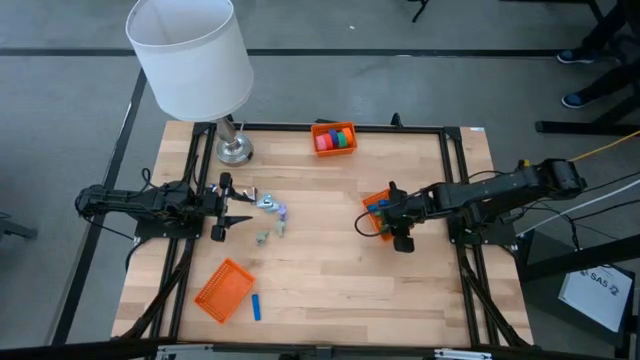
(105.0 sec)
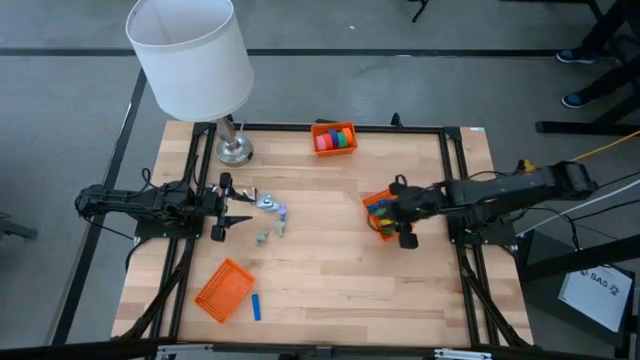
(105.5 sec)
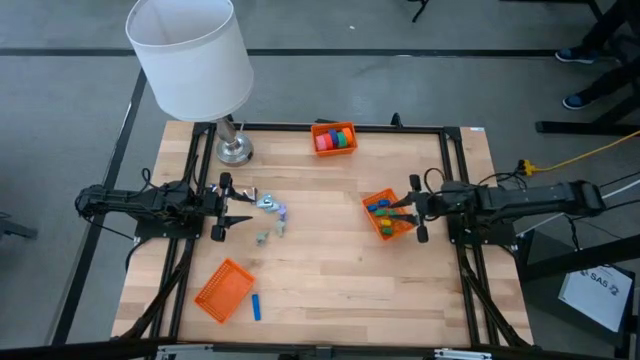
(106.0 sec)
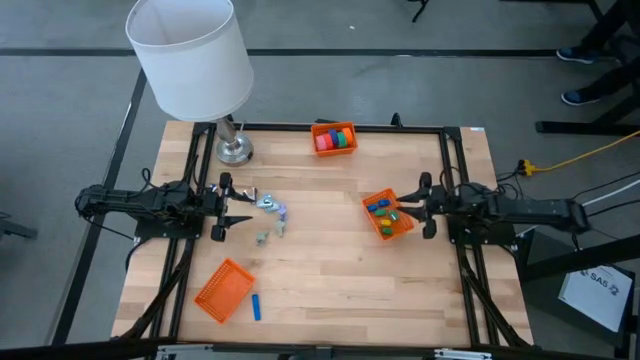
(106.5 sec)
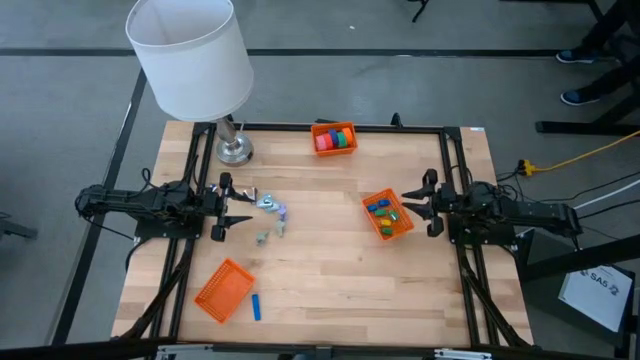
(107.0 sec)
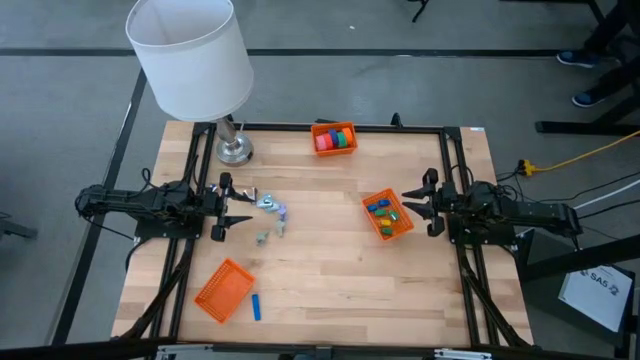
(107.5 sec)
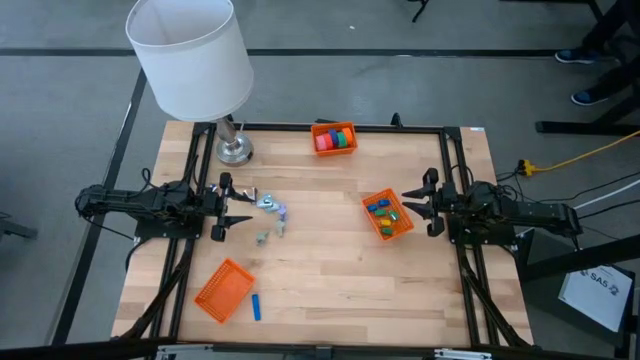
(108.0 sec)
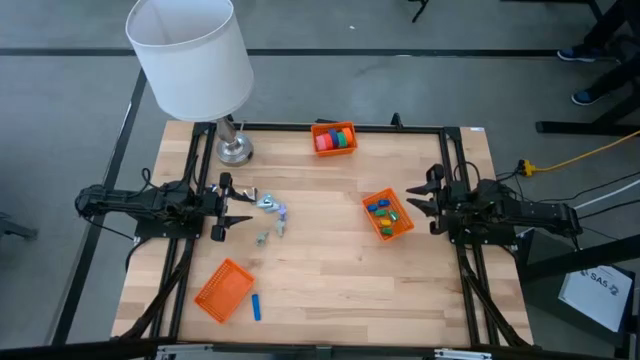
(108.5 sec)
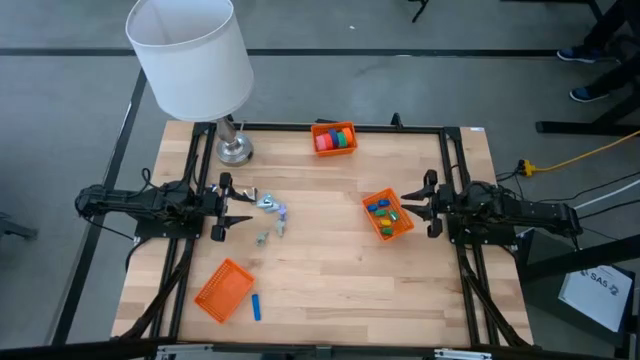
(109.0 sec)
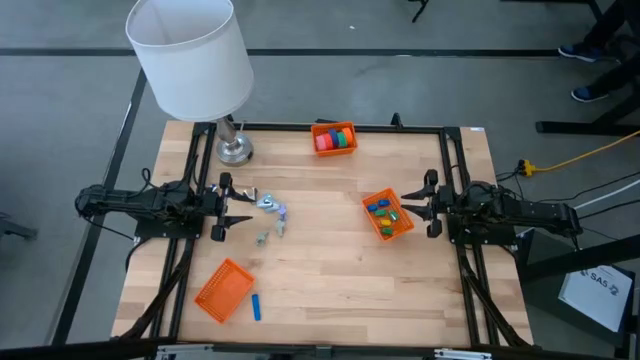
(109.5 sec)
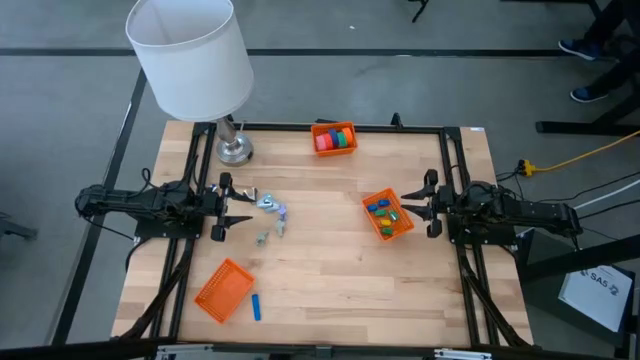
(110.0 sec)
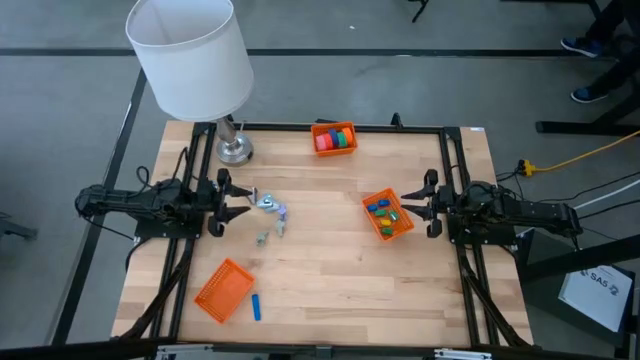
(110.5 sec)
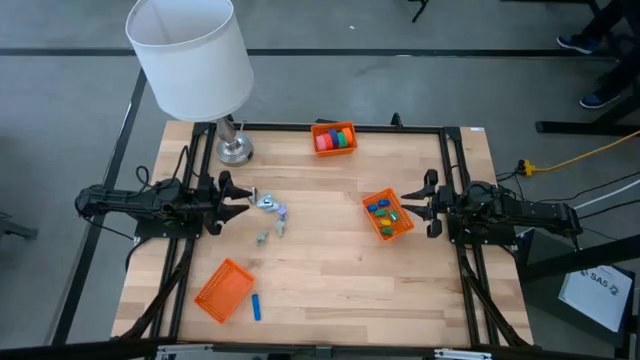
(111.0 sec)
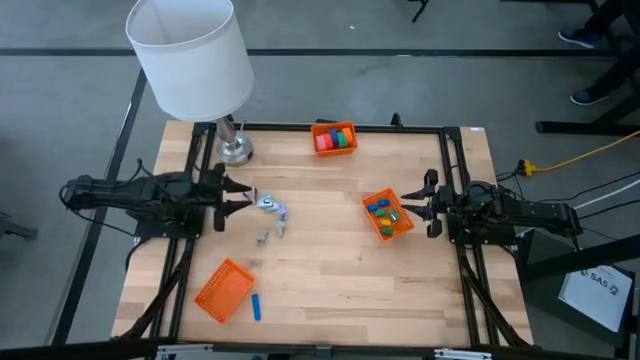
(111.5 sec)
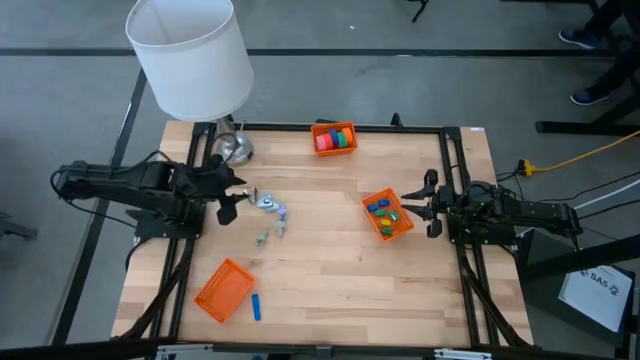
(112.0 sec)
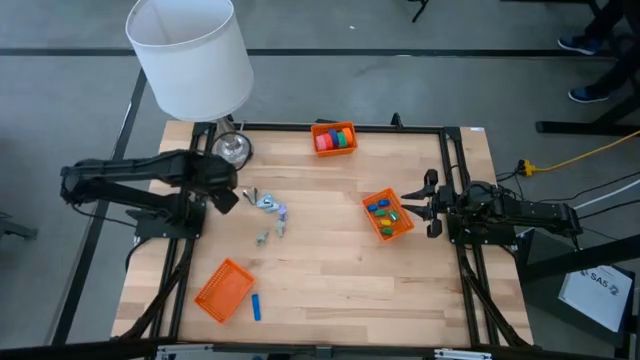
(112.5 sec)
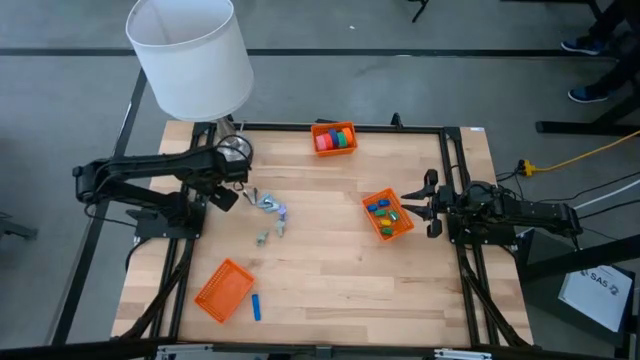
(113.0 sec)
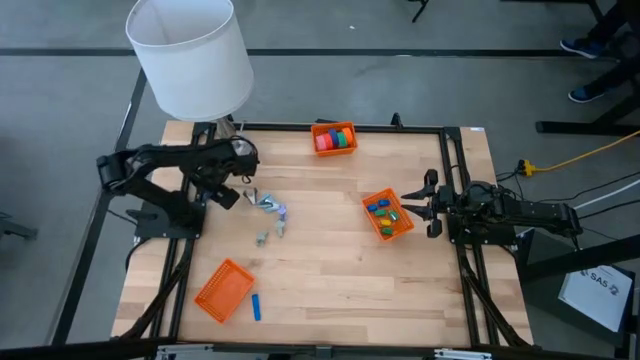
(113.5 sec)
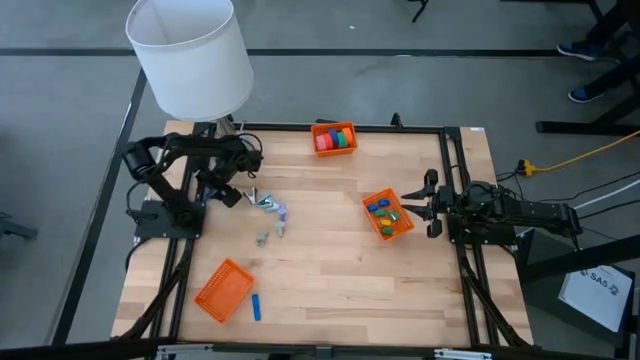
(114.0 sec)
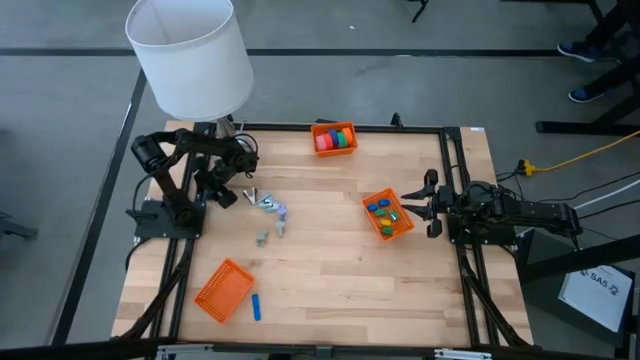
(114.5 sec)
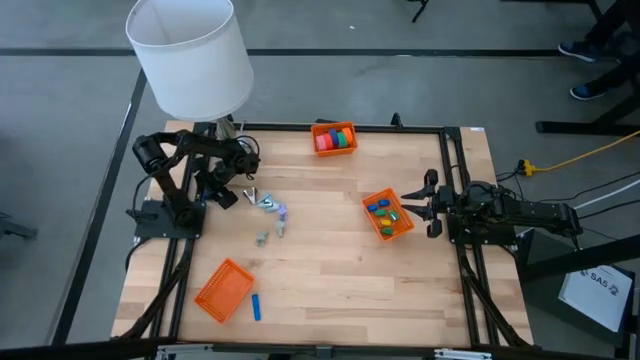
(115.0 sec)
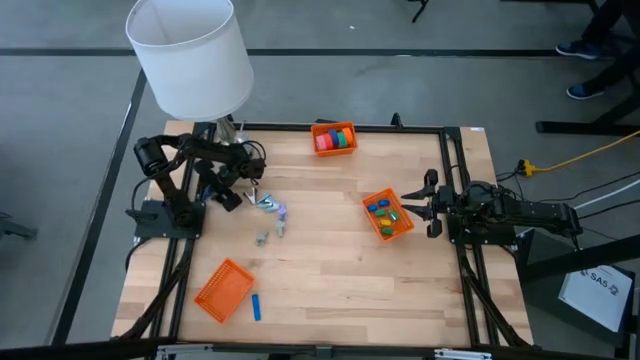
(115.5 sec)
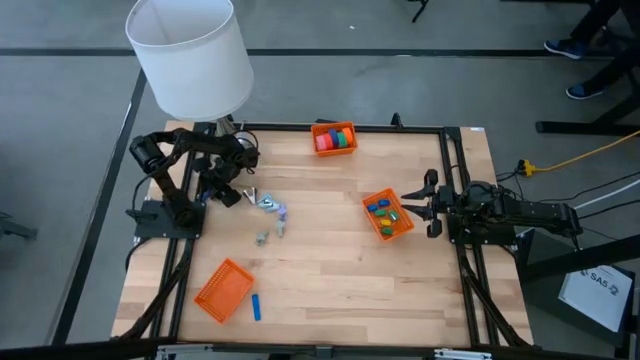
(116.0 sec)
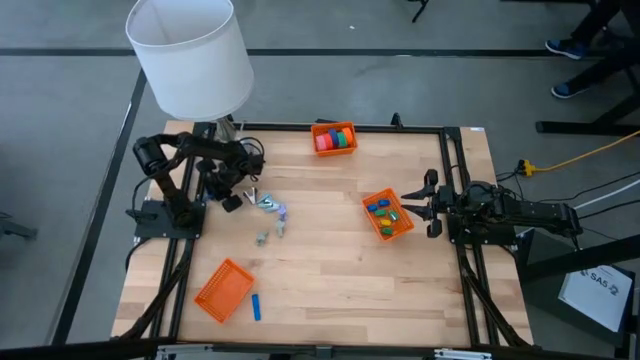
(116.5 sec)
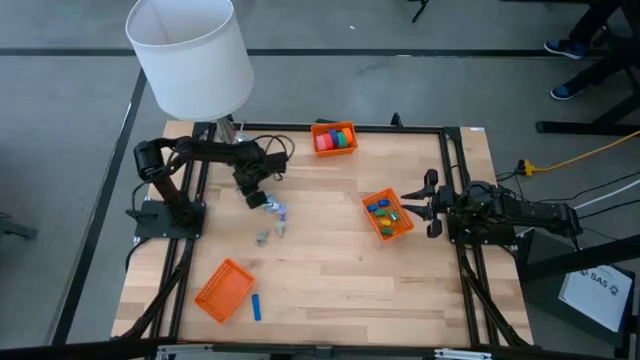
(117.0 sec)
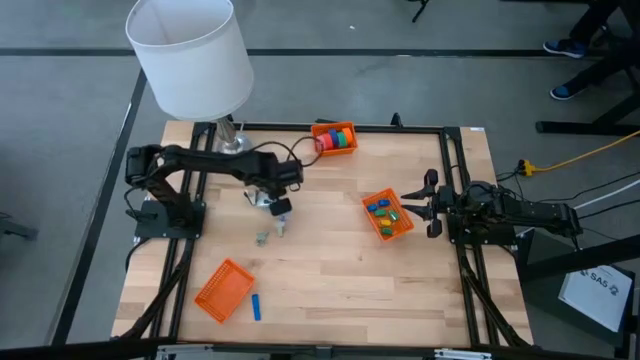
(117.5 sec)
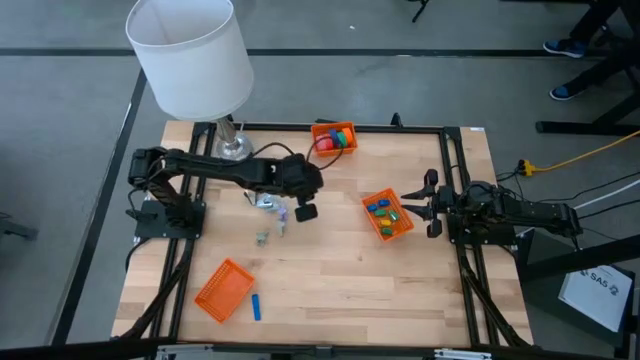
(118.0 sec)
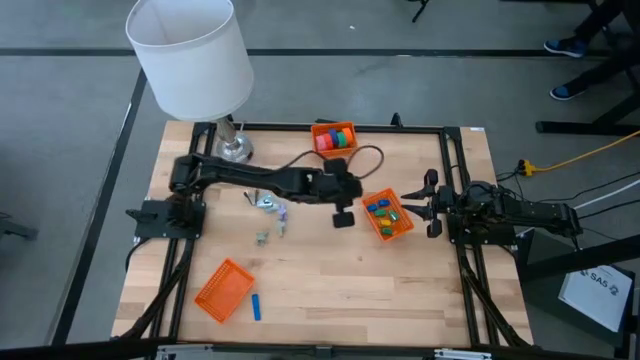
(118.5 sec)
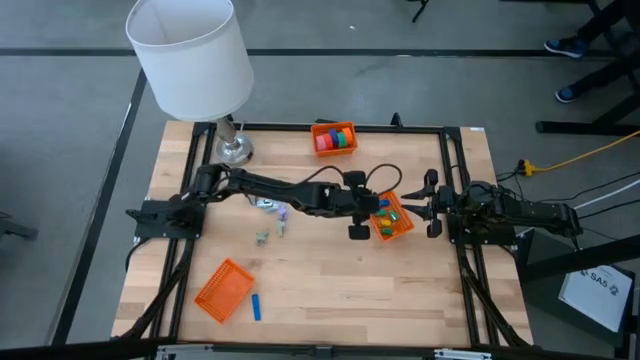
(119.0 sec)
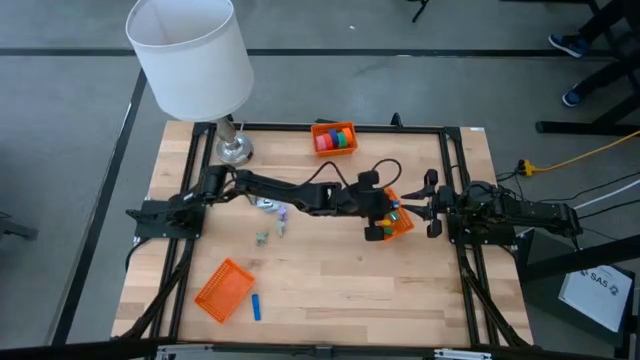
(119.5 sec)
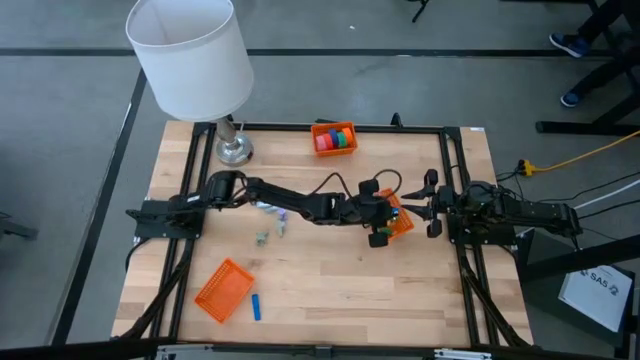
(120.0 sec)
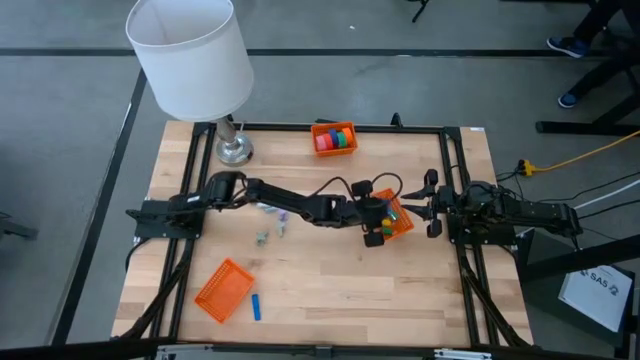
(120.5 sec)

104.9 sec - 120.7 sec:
Task: Pick and place Stapler, Stapler remover, tape
Put the blue stapler into the middle orange bin

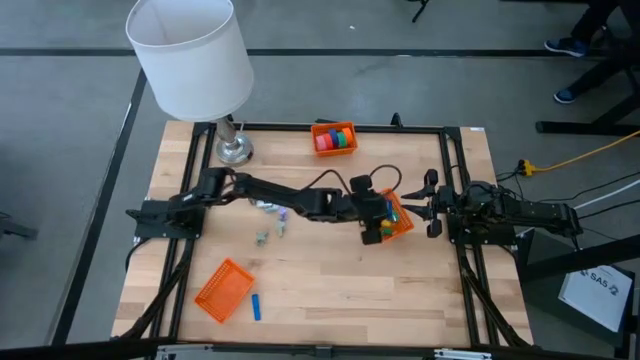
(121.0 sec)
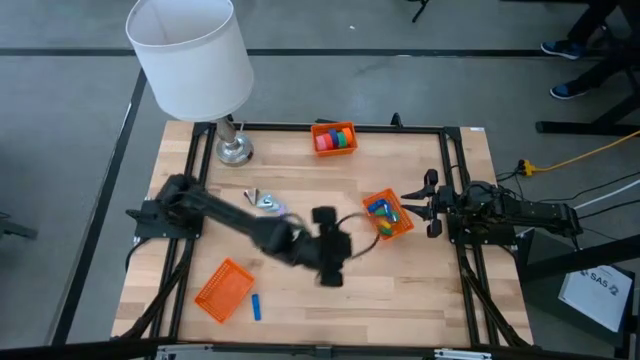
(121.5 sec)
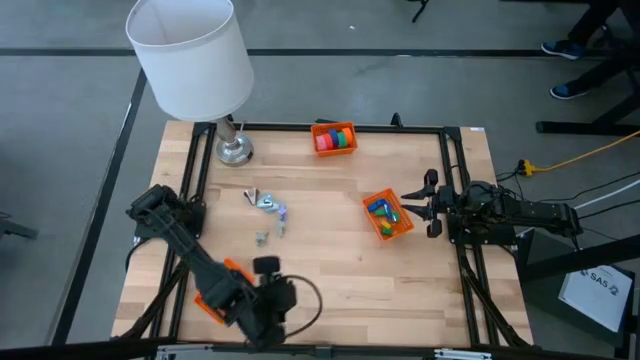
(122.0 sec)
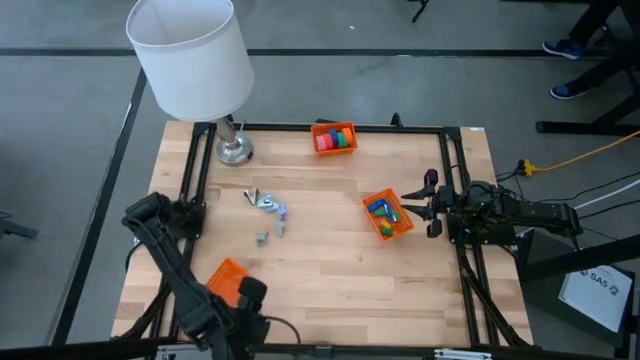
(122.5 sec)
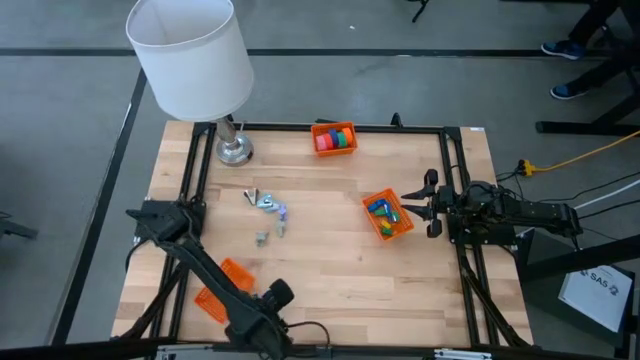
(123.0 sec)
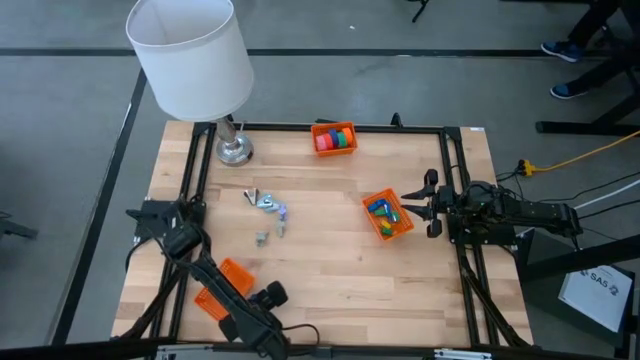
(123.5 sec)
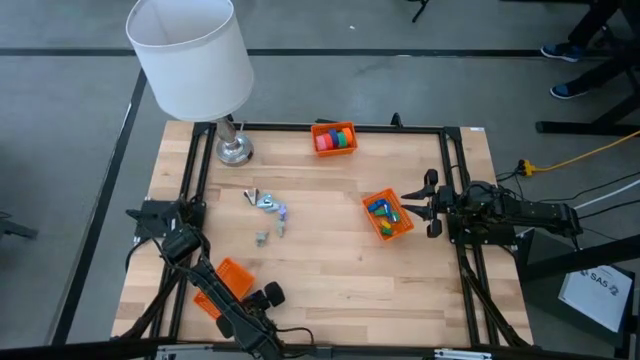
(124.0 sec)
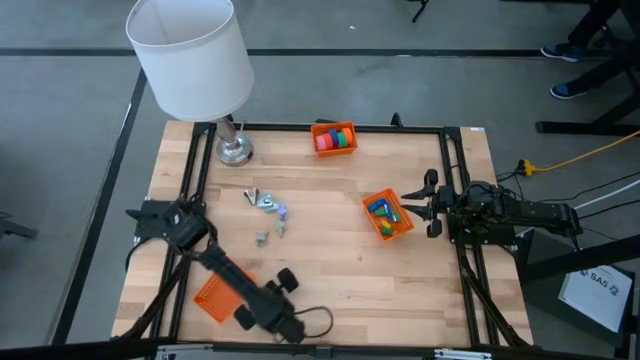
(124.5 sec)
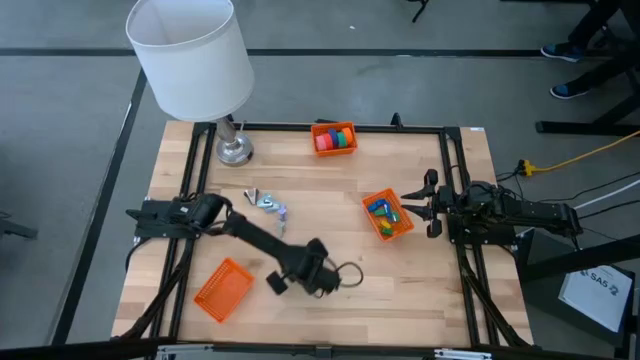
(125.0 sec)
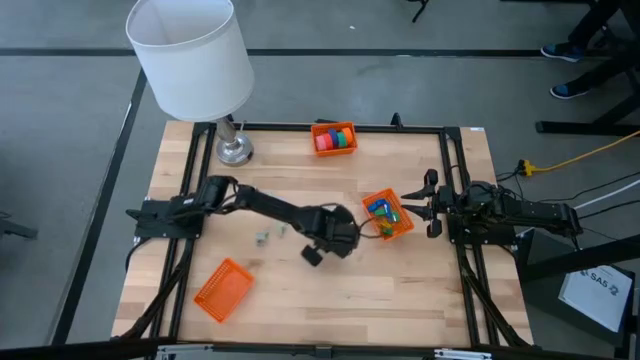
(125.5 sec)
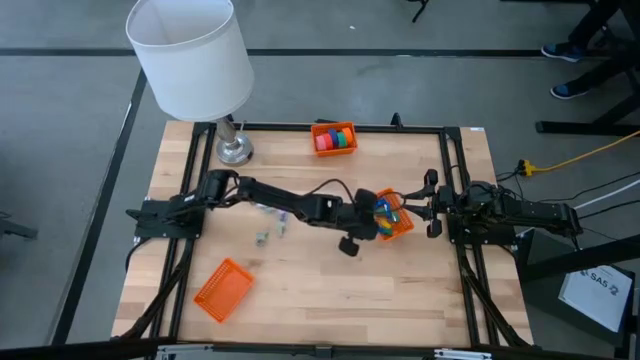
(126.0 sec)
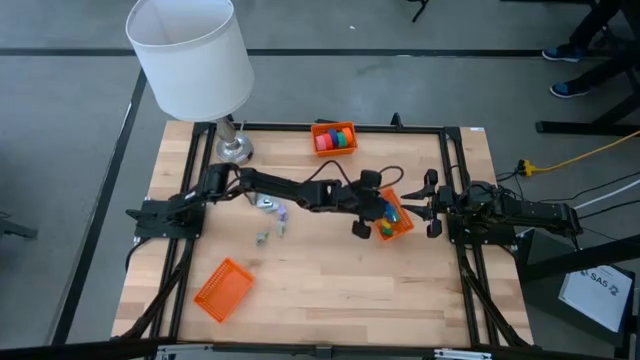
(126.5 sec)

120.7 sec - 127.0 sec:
Put the blue stapler into the middle orange bin
